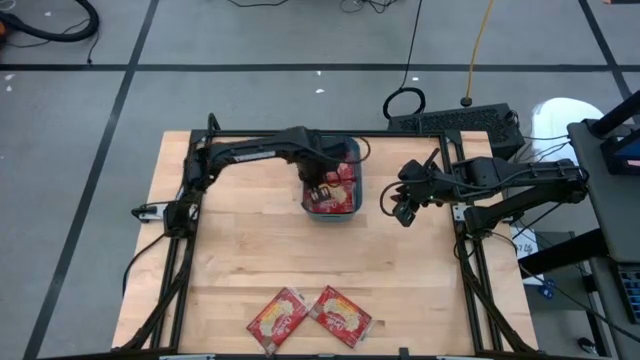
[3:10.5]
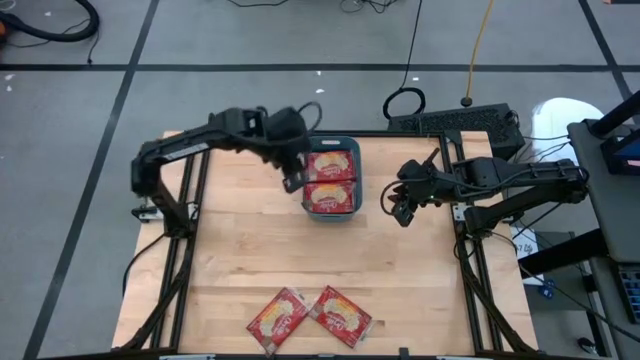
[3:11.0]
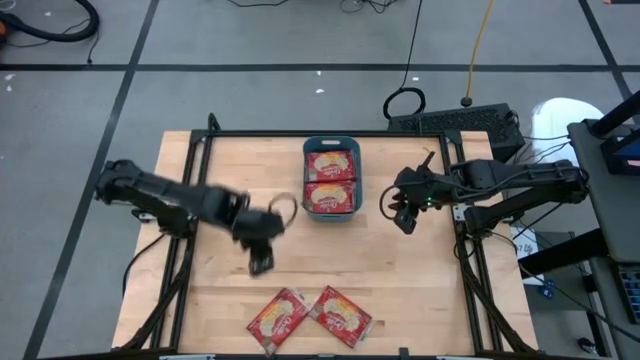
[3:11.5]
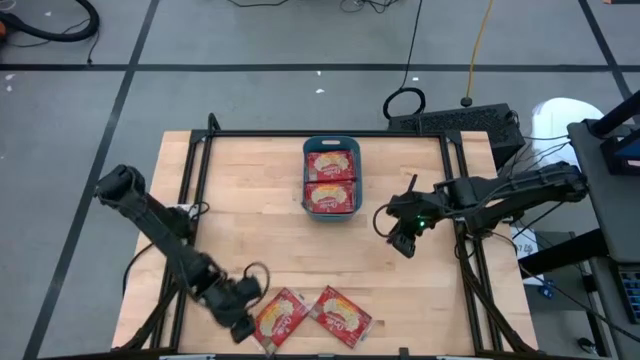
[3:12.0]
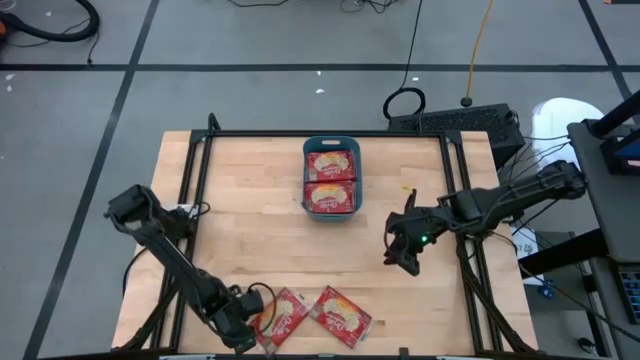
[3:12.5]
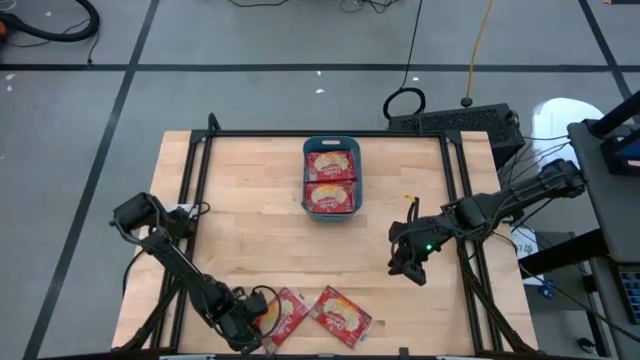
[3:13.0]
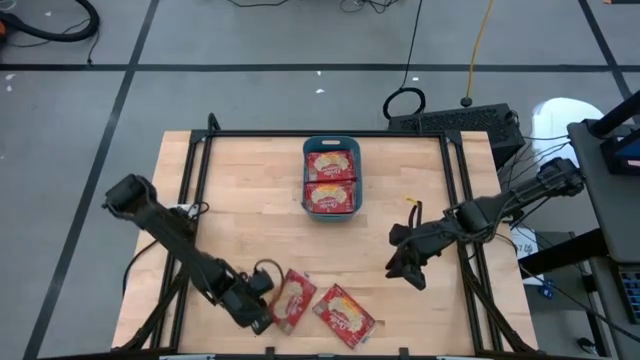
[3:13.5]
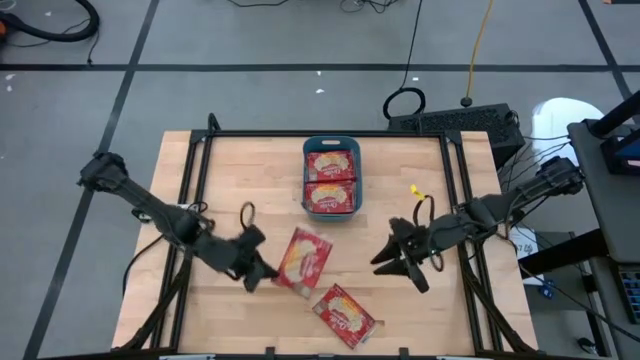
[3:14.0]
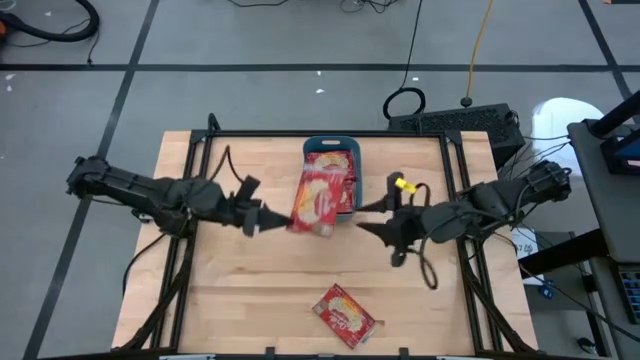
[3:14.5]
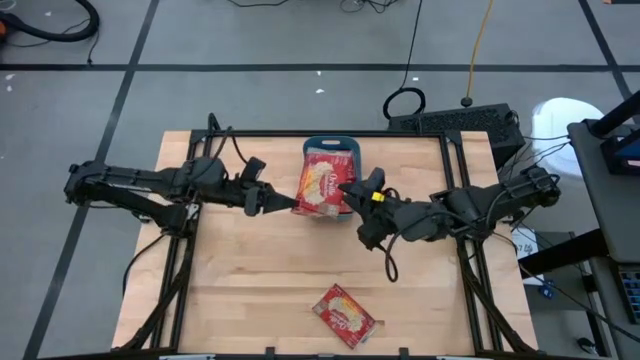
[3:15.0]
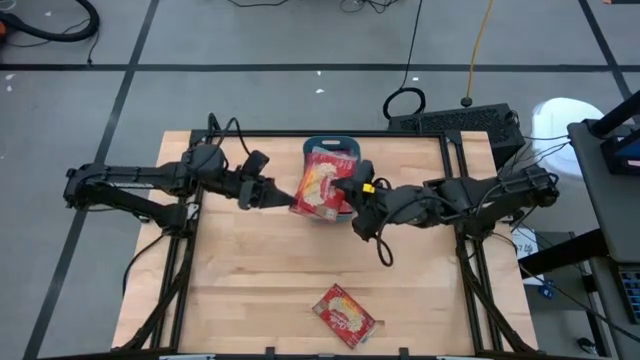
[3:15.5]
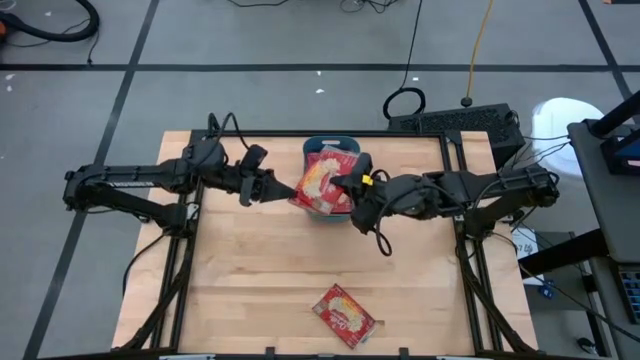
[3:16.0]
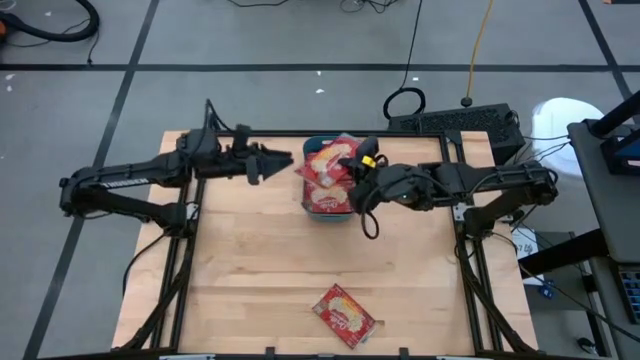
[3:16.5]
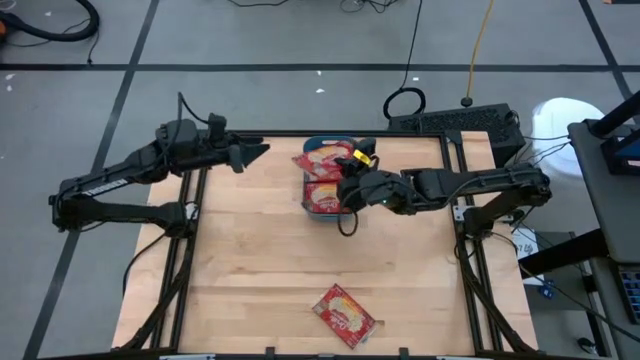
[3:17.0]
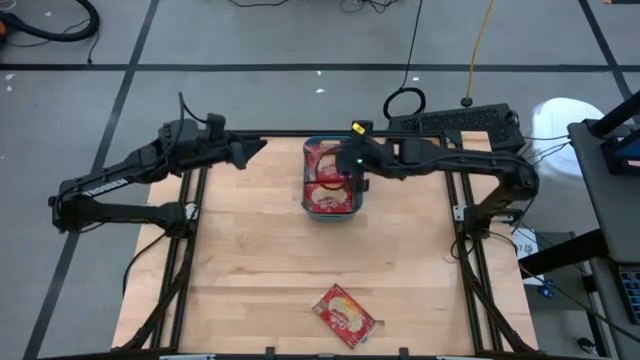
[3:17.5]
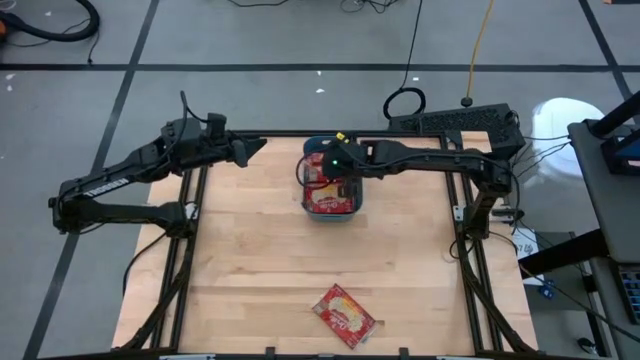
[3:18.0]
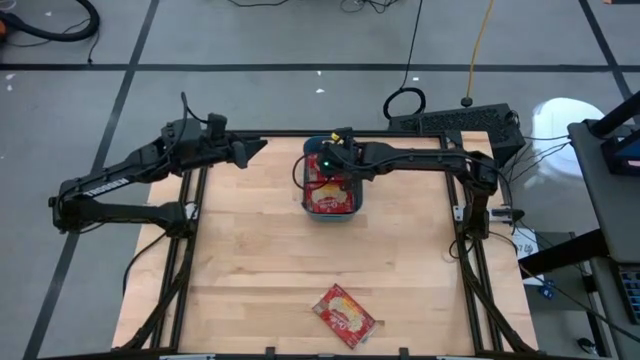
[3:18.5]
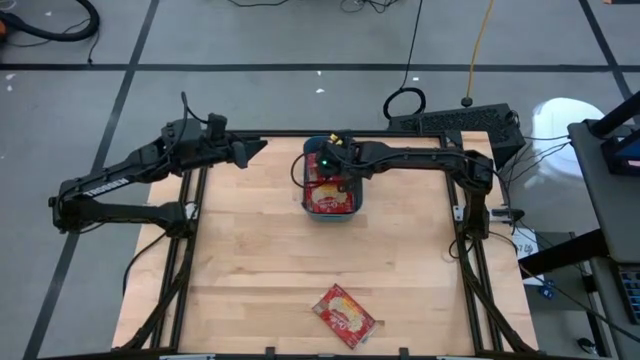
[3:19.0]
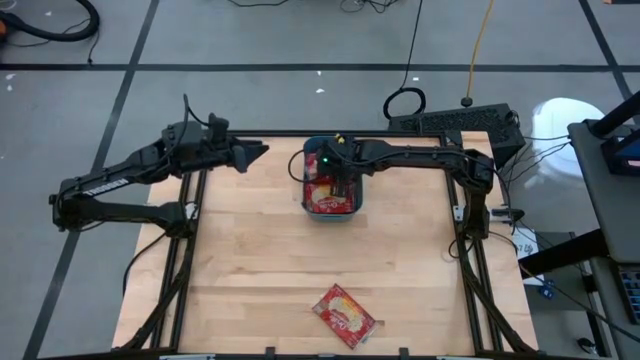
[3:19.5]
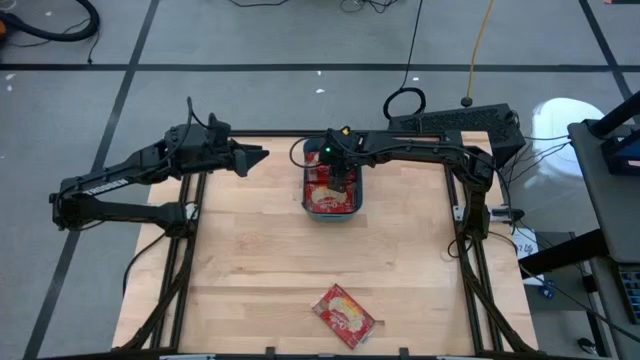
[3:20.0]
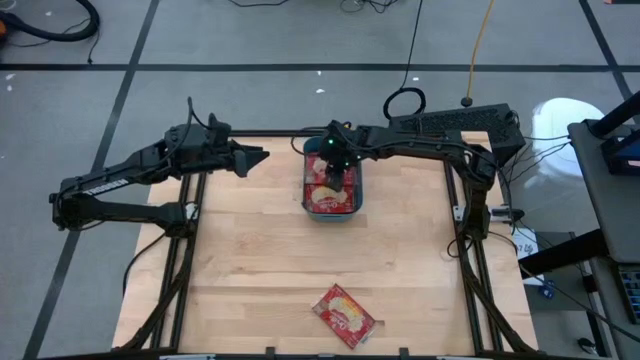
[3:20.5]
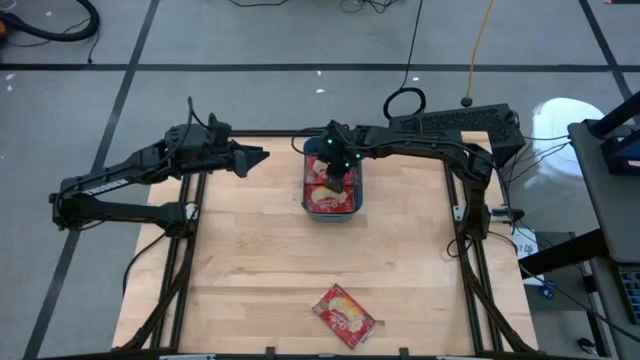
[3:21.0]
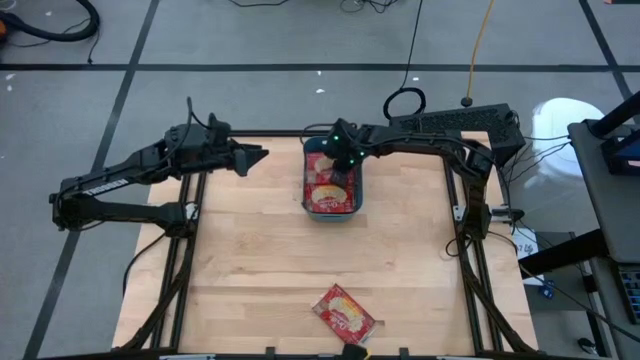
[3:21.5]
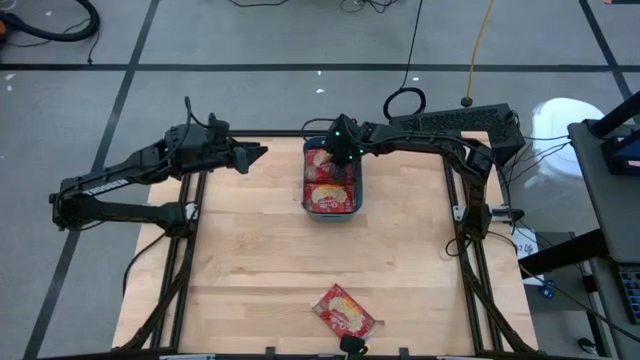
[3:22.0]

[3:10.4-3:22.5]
Task: Sort popcorn bags into baskets
Put the red popcorn bag into the blue bin

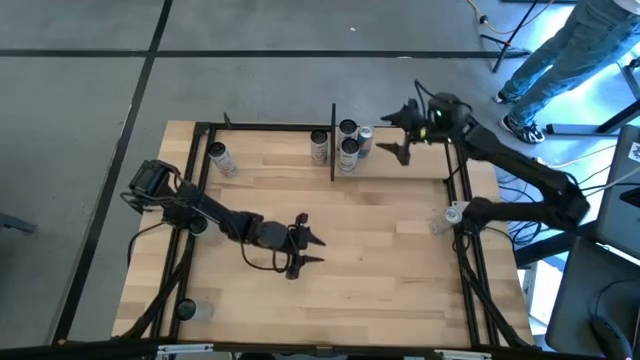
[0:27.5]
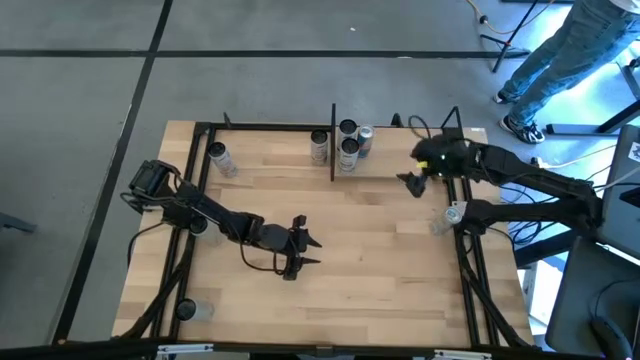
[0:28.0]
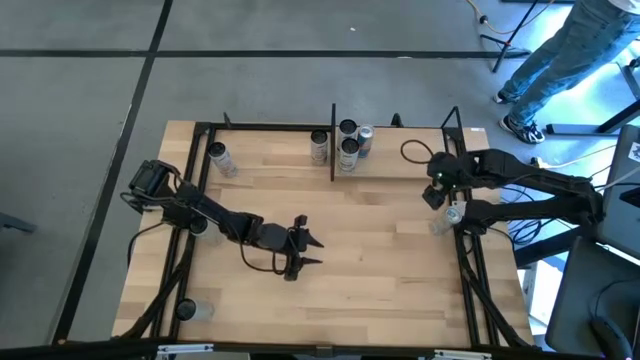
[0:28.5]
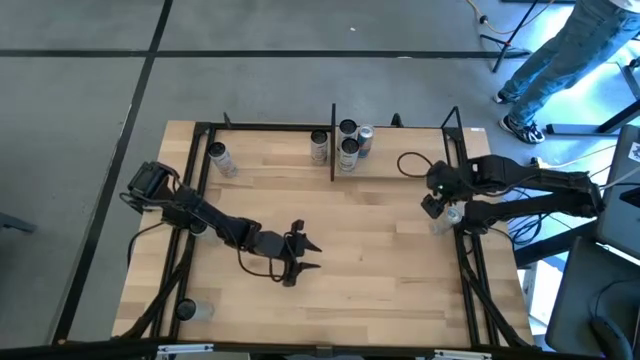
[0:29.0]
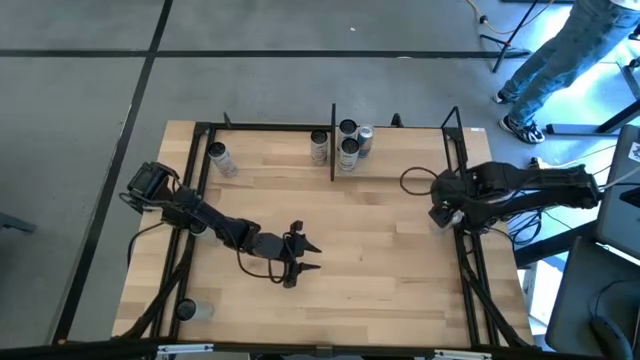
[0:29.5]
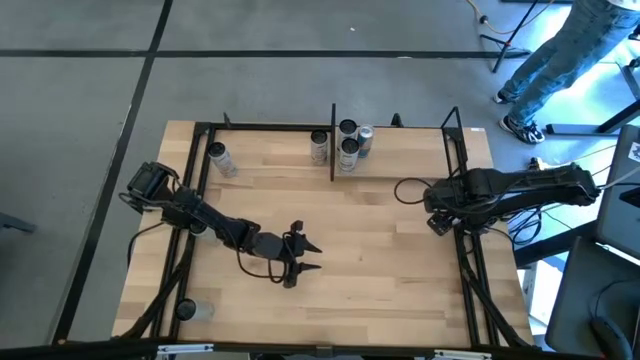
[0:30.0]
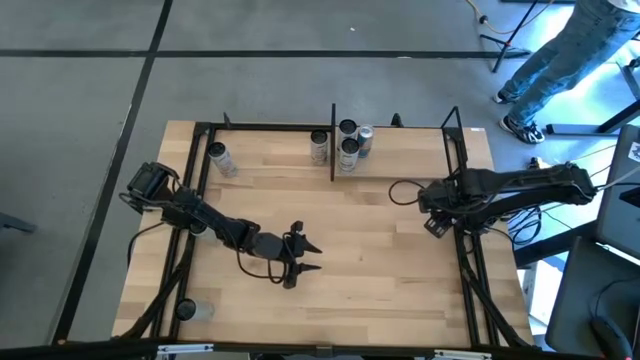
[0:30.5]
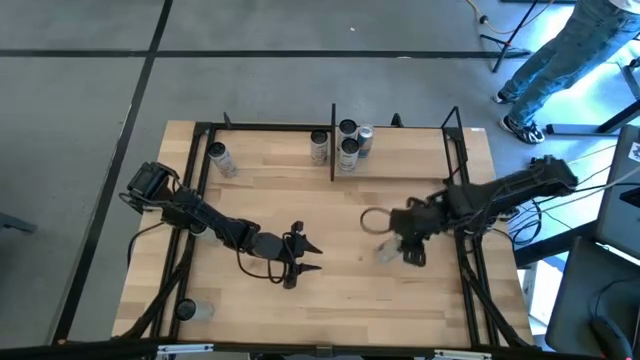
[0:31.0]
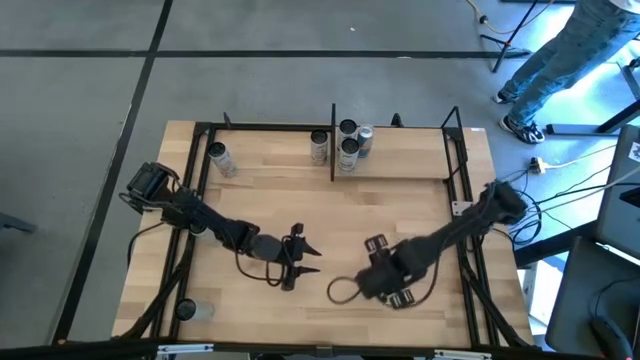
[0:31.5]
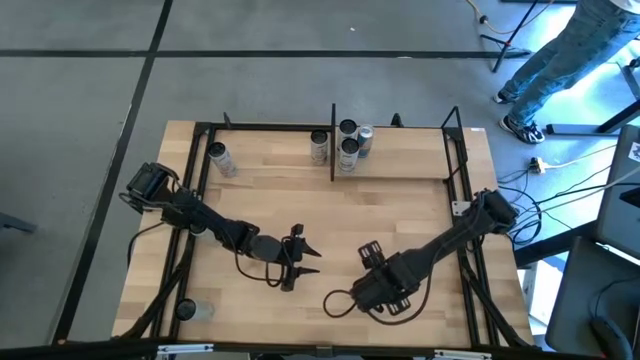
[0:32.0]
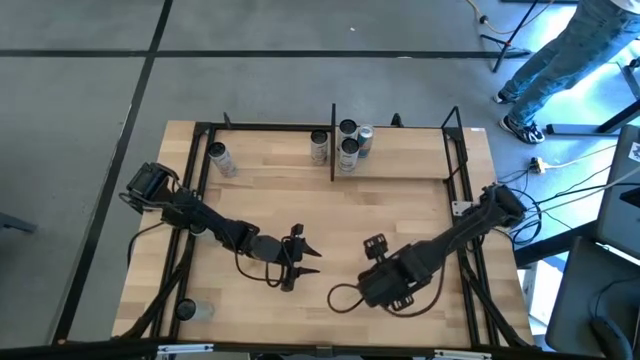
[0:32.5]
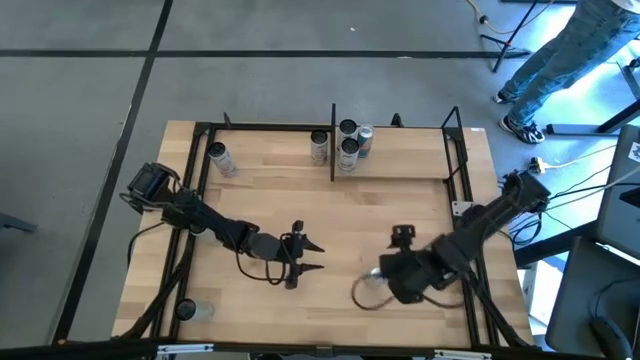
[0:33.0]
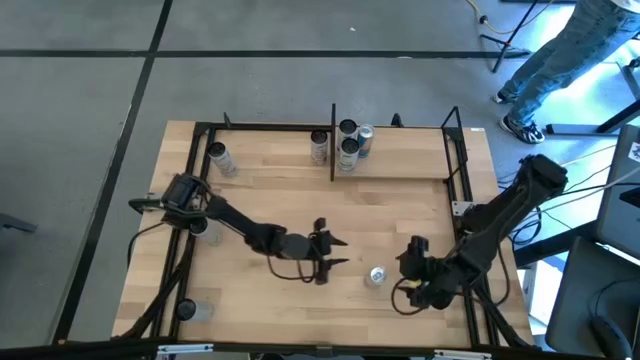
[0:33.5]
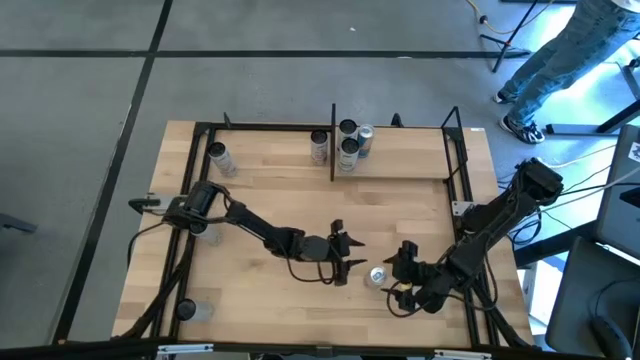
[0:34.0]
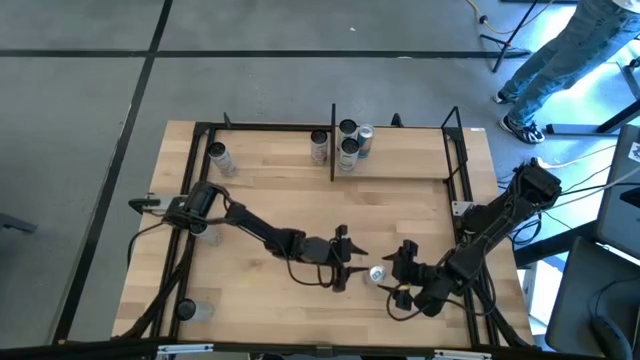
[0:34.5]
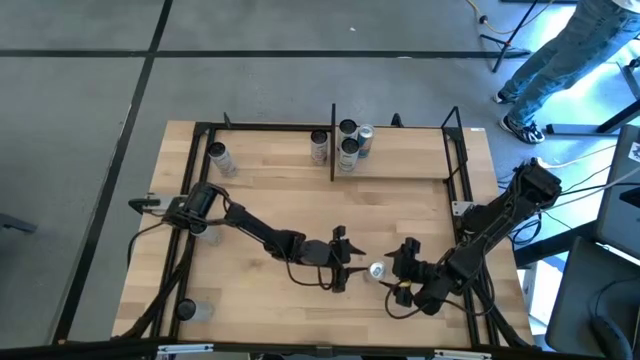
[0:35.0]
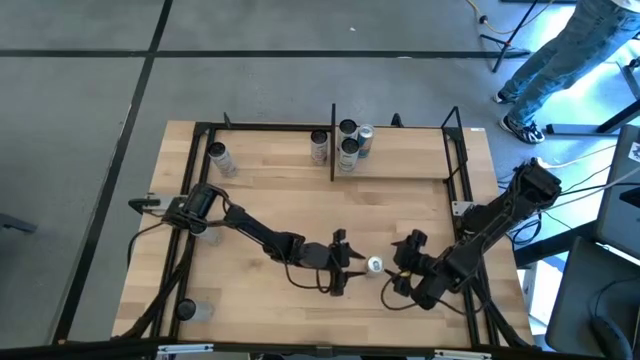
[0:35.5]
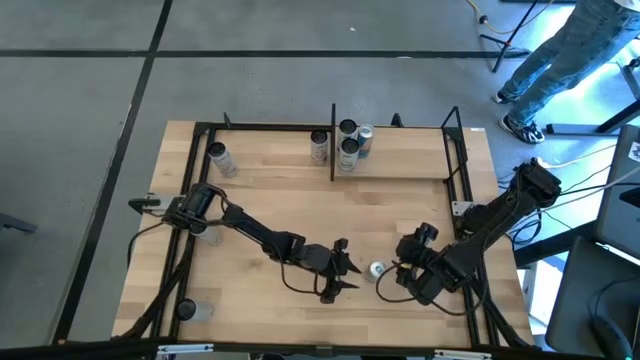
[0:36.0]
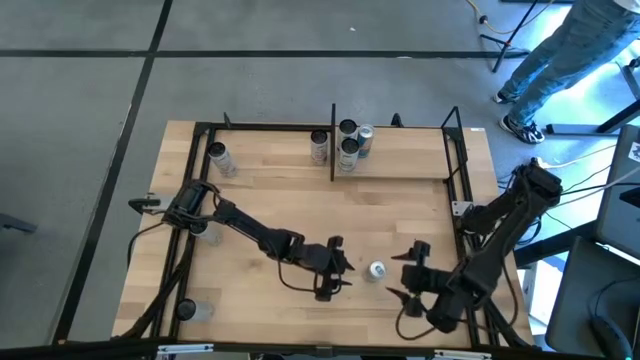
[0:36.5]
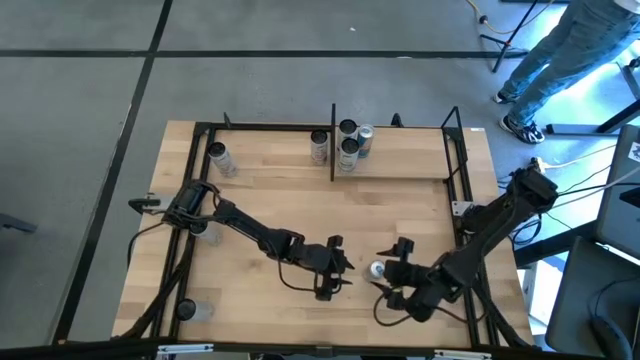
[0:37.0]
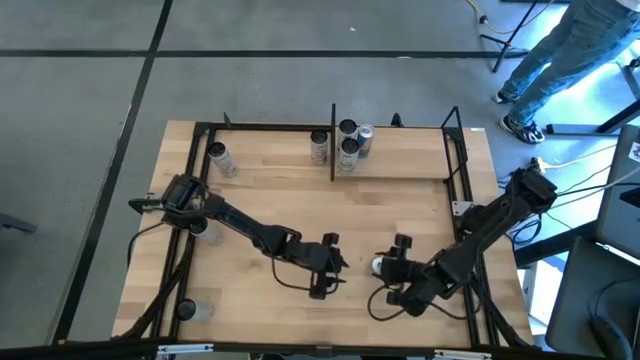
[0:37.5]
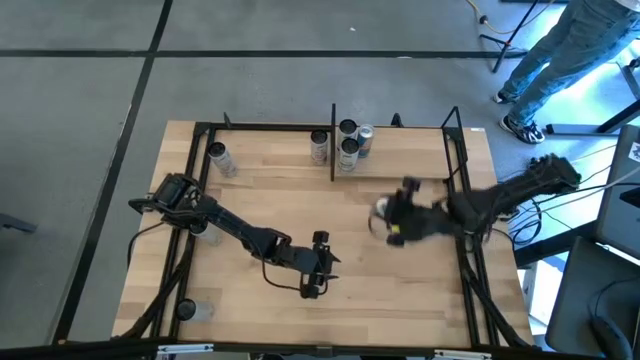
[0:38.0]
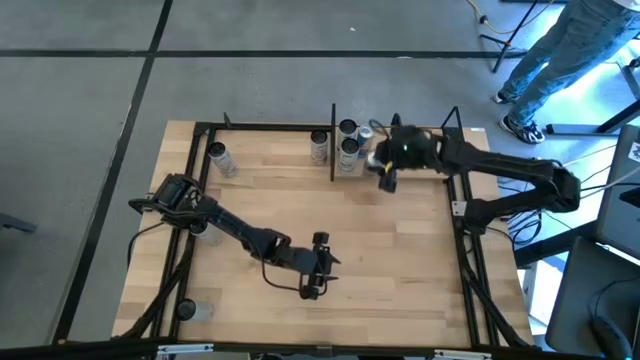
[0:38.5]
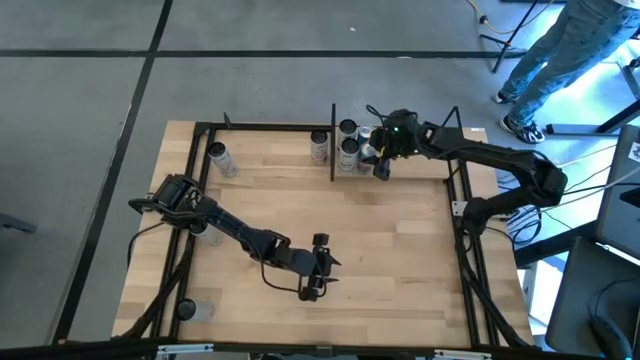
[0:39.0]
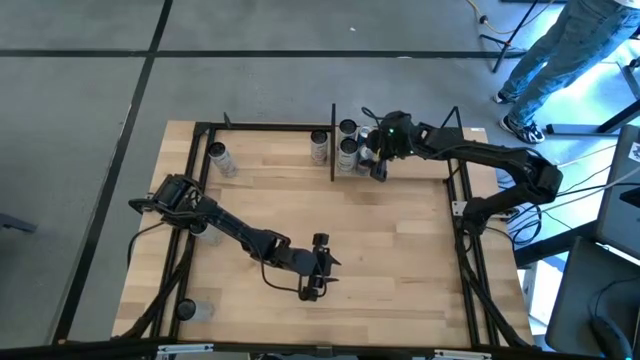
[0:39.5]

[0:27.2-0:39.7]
Task: Place canned beverage on shelf
Put the blue soda can on the shelf aligned with the other blue soda can
